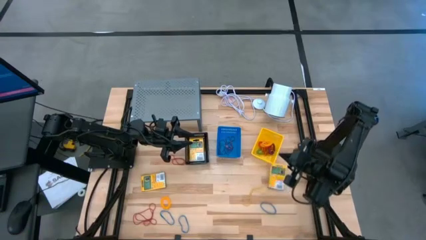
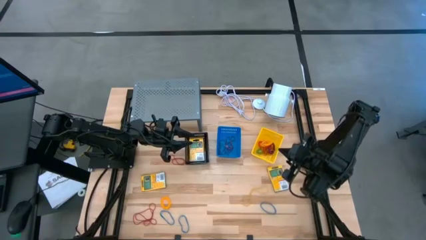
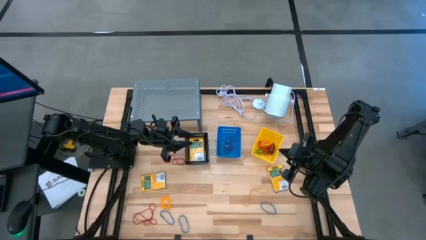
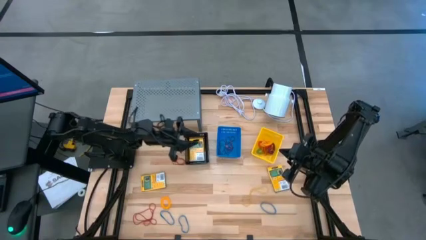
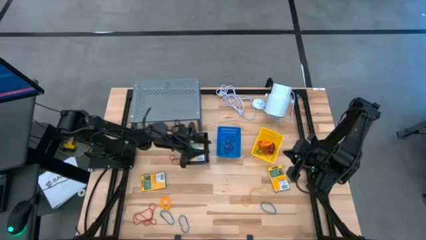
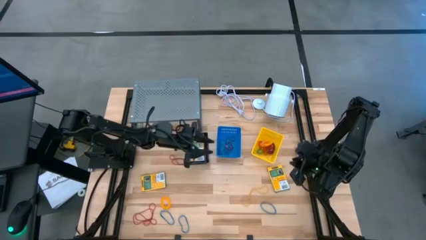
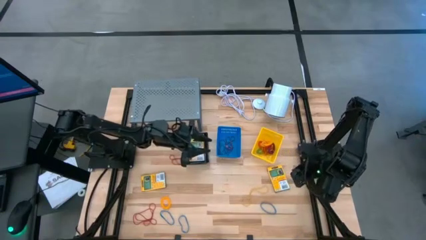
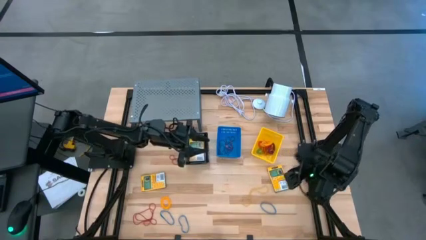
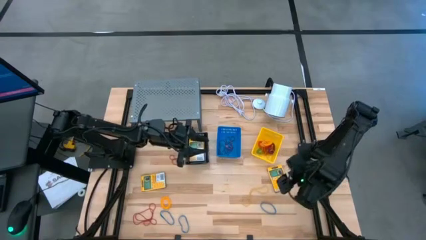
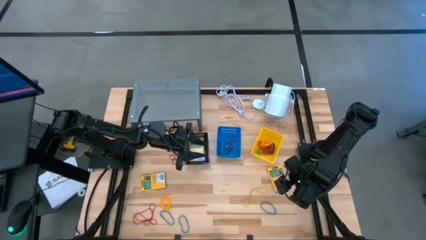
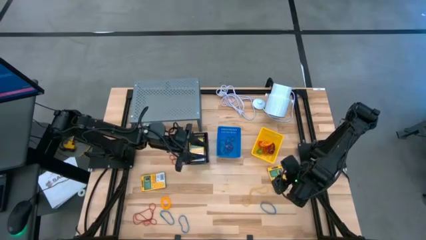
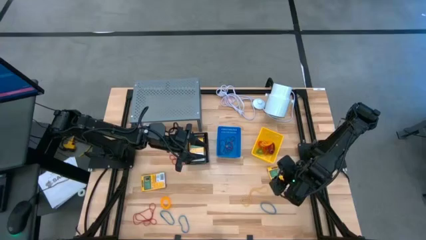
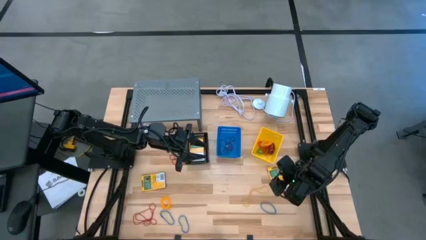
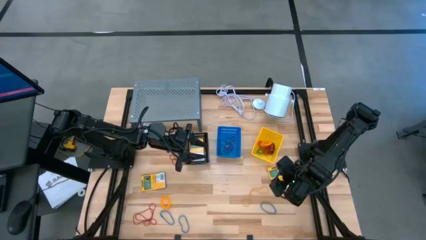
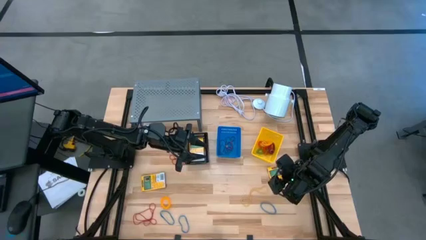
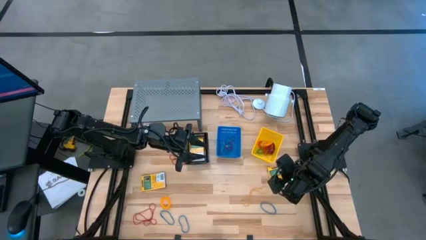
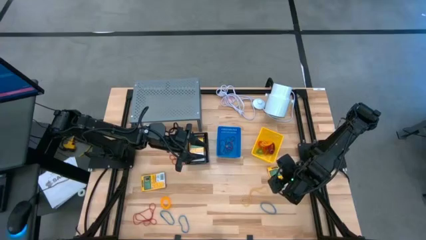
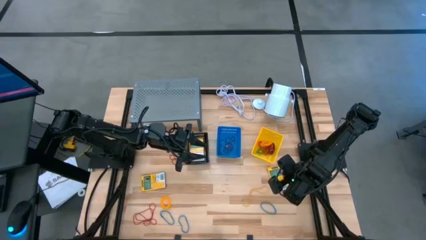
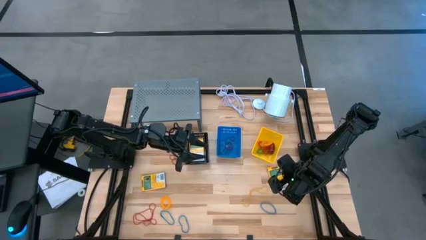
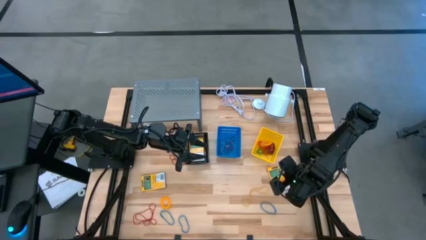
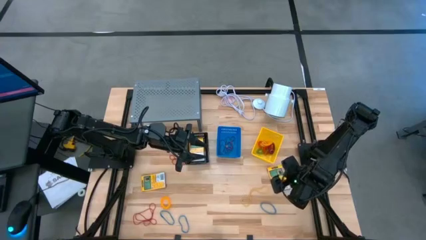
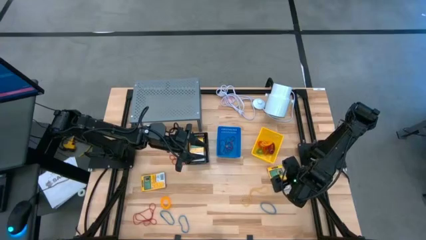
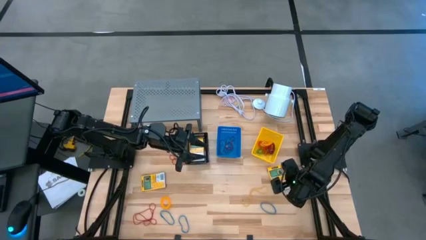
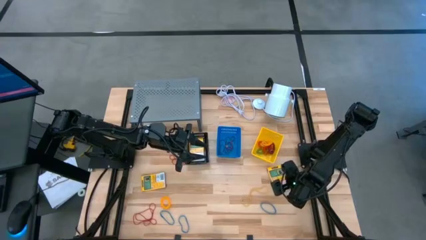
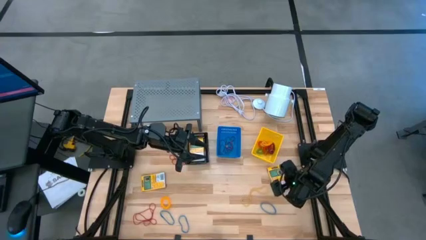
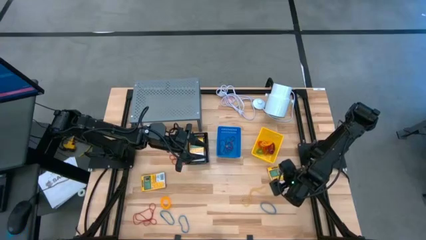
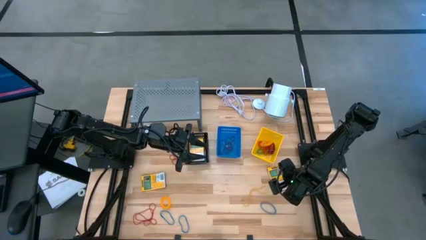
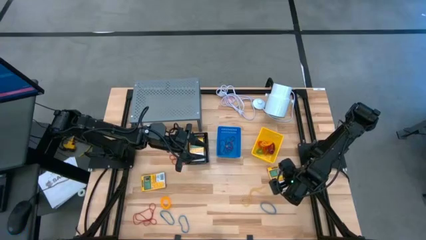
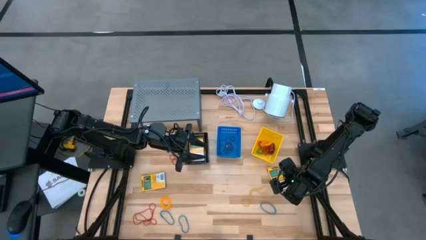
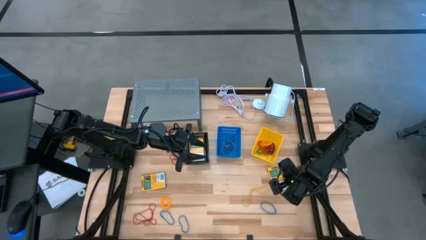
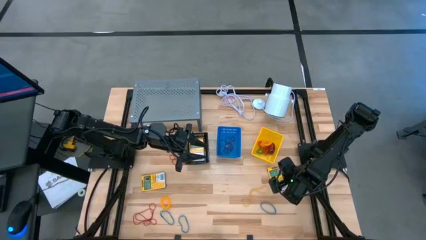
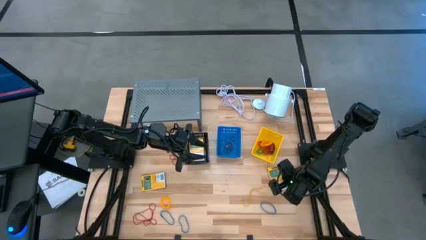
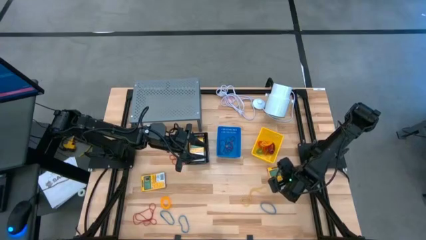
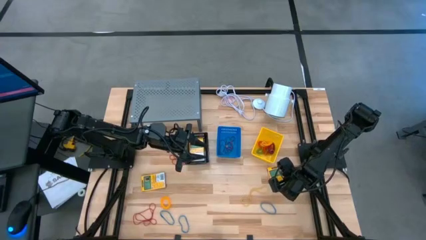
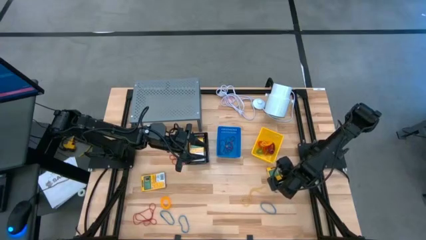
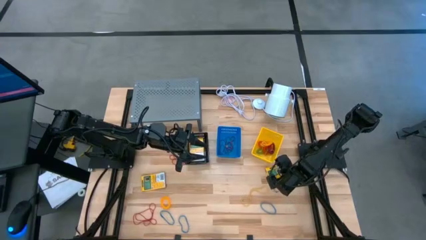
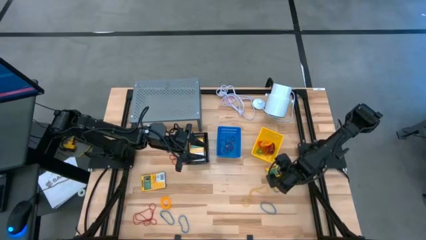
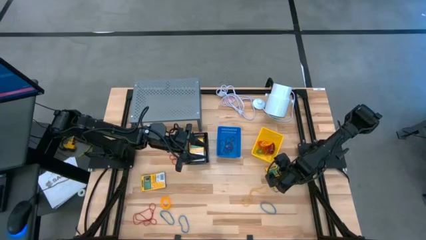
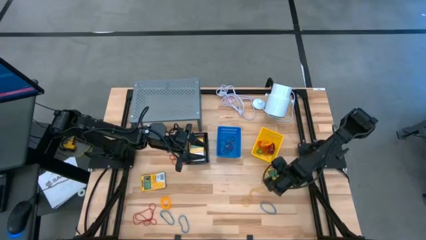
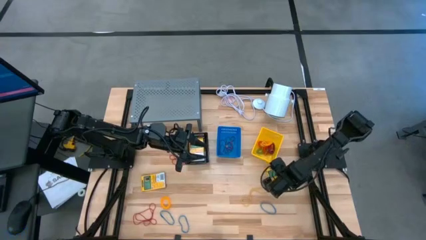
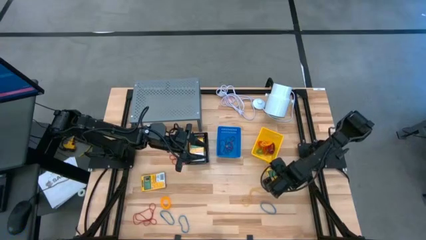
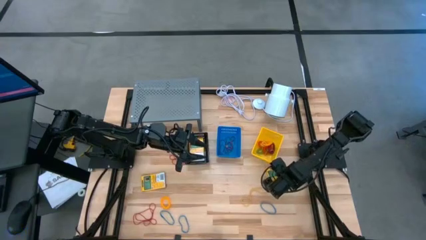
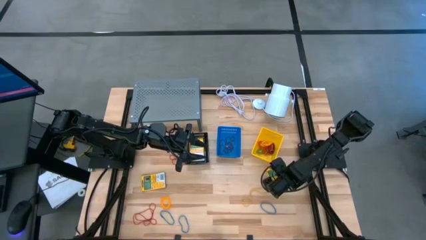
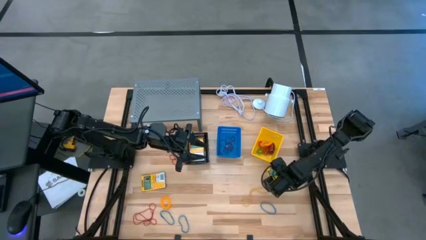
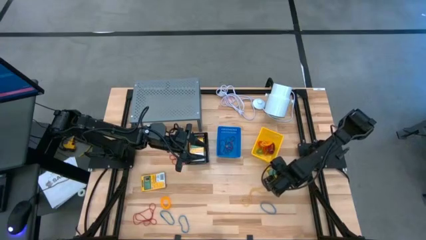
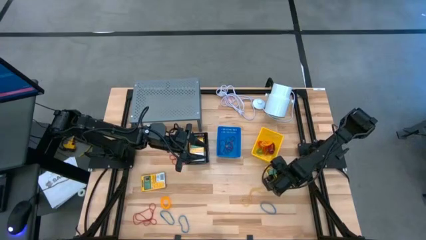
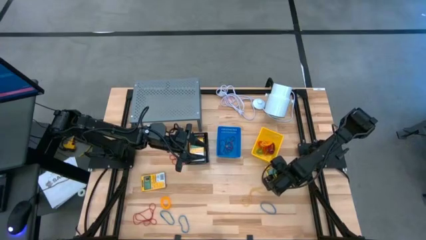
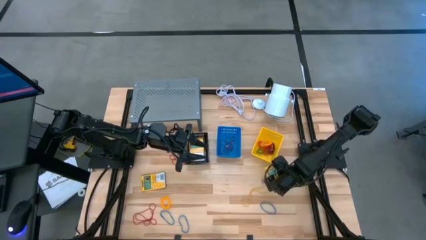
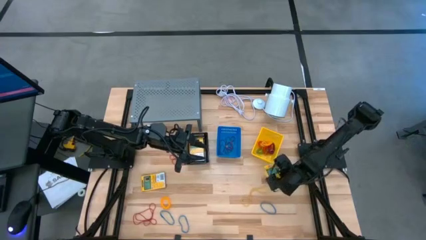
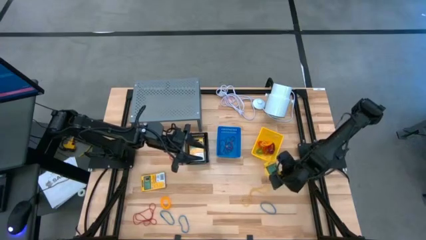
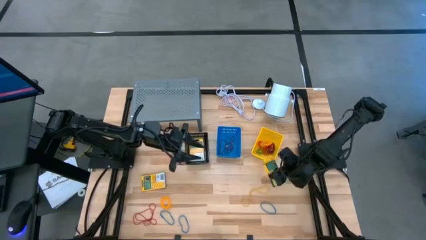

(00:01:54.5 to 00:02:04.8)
Task: Pick & Place Office Desk Supplies
Put the crayon box into the black basket
